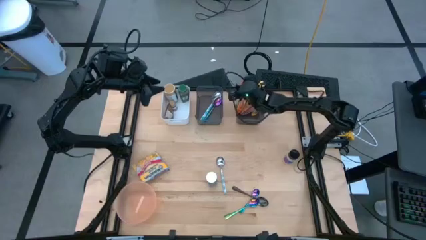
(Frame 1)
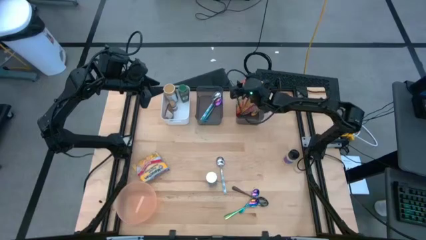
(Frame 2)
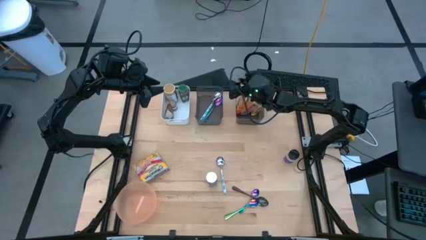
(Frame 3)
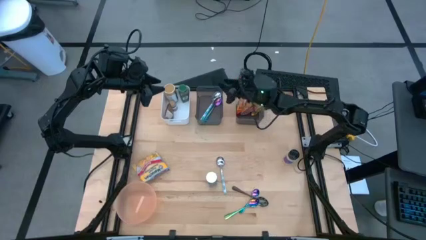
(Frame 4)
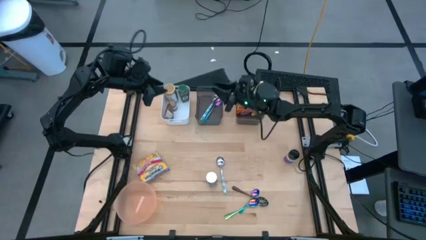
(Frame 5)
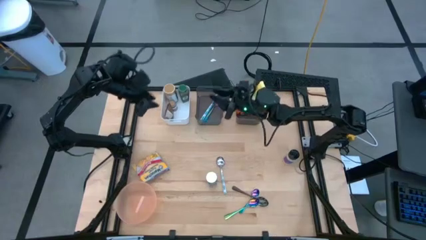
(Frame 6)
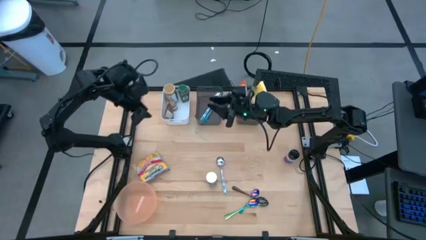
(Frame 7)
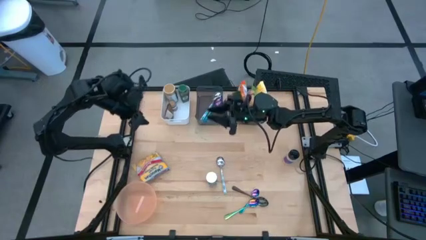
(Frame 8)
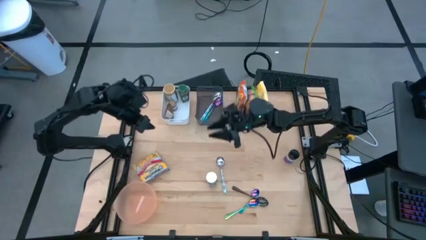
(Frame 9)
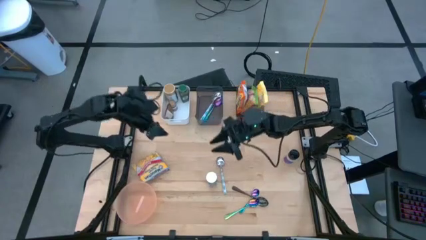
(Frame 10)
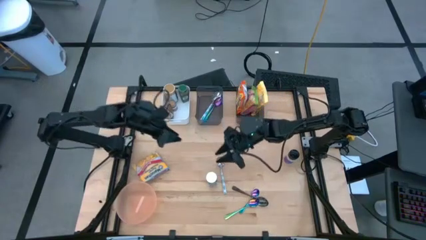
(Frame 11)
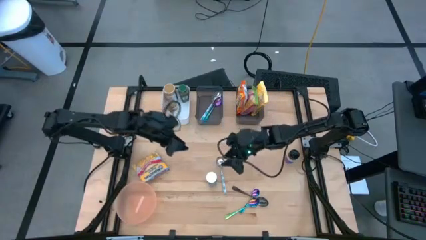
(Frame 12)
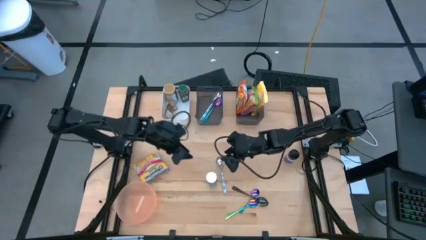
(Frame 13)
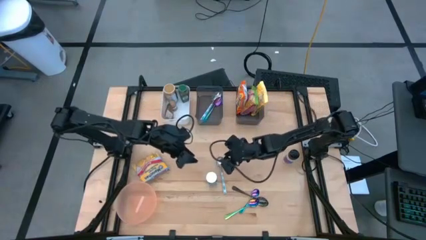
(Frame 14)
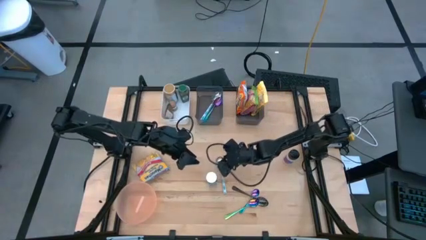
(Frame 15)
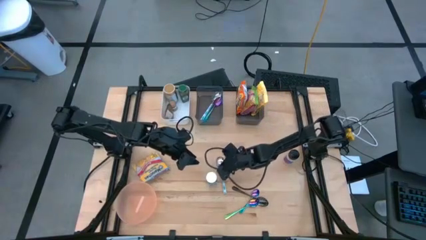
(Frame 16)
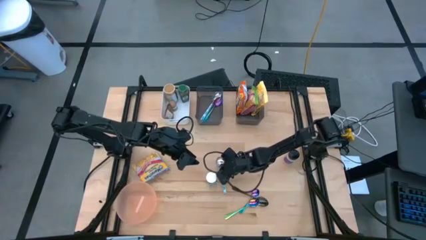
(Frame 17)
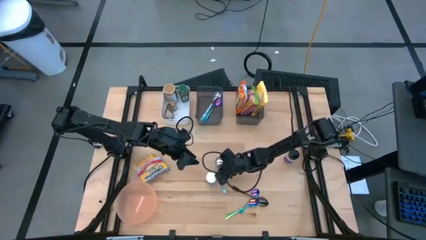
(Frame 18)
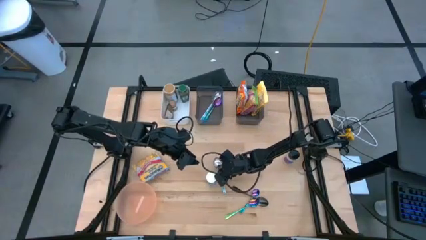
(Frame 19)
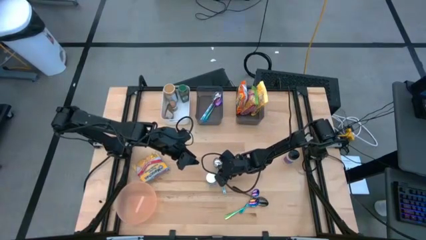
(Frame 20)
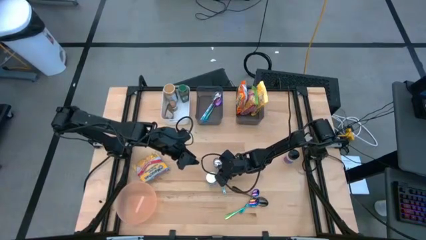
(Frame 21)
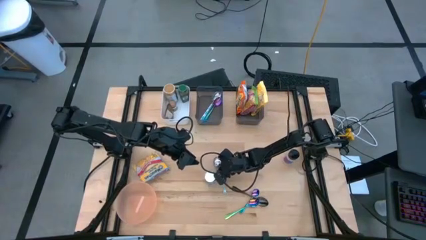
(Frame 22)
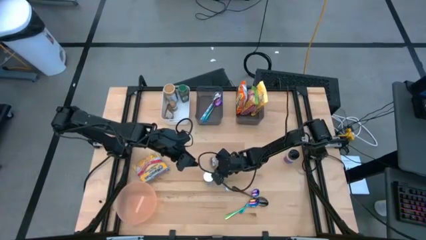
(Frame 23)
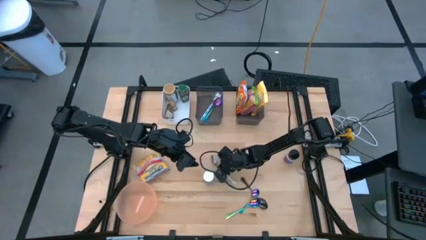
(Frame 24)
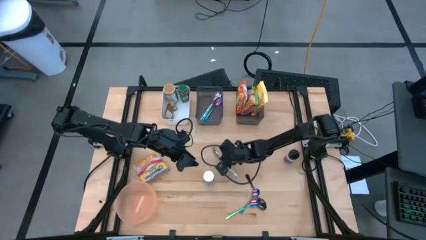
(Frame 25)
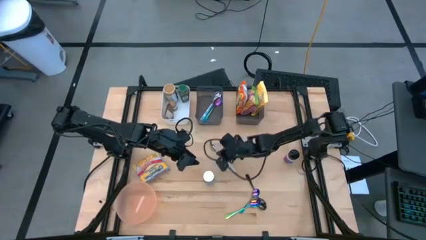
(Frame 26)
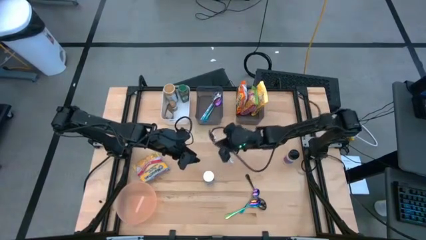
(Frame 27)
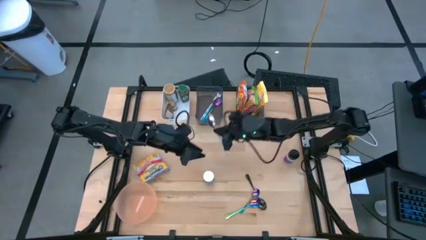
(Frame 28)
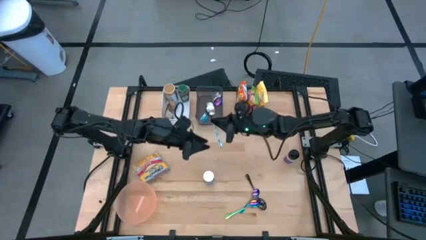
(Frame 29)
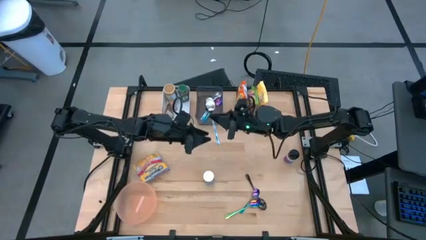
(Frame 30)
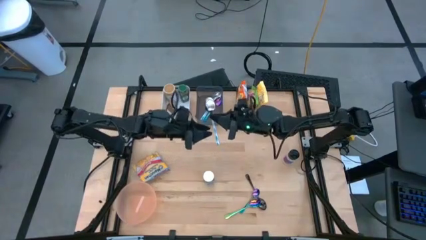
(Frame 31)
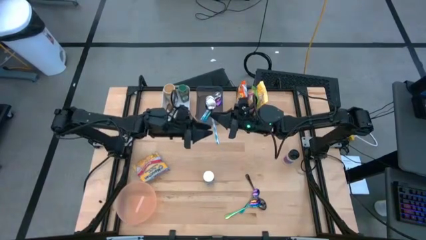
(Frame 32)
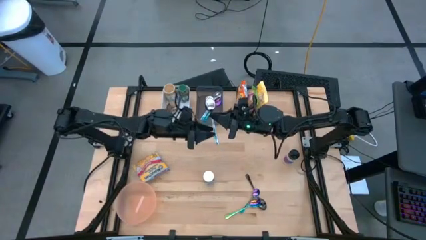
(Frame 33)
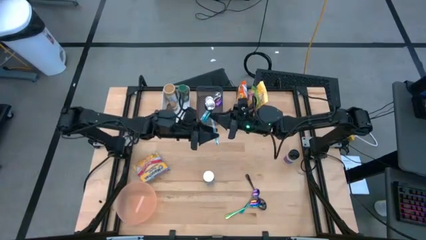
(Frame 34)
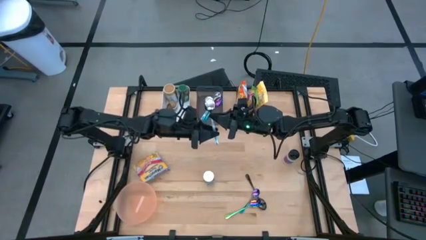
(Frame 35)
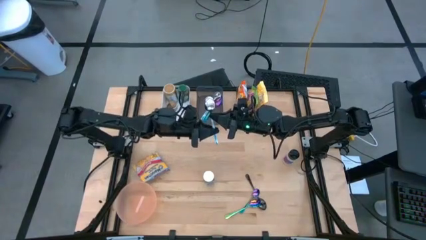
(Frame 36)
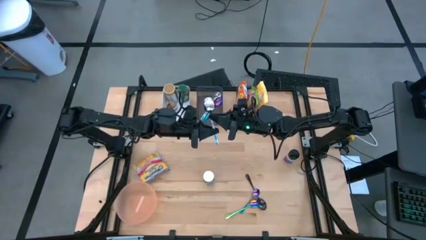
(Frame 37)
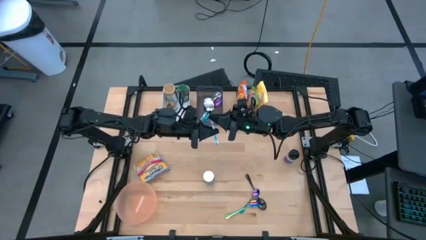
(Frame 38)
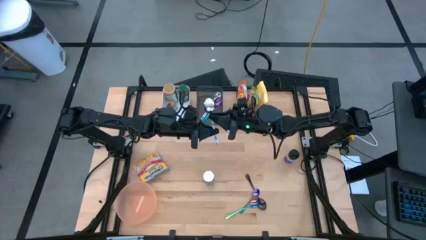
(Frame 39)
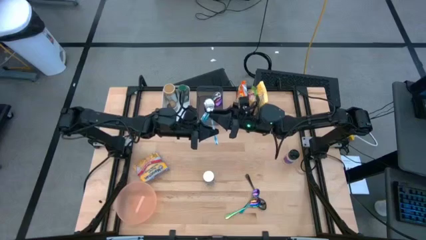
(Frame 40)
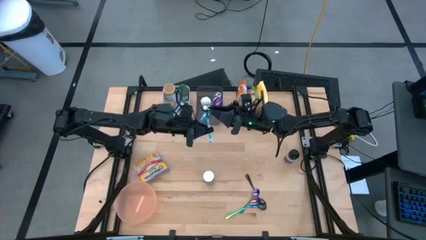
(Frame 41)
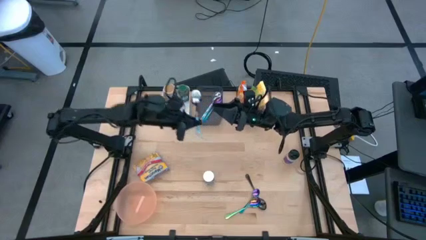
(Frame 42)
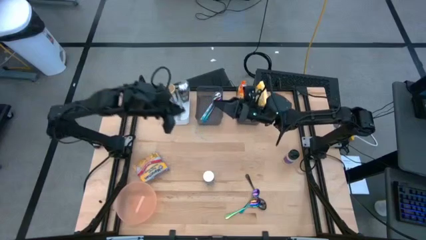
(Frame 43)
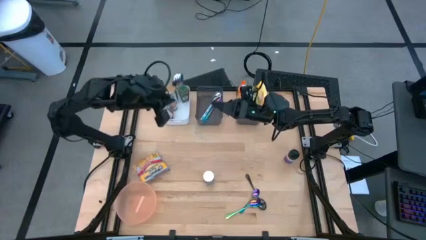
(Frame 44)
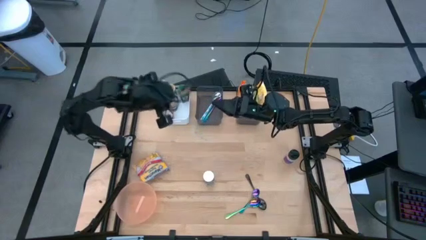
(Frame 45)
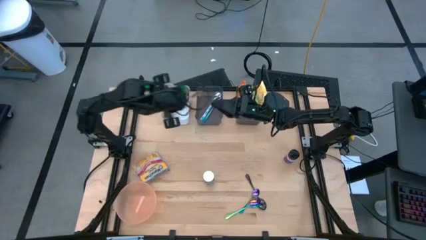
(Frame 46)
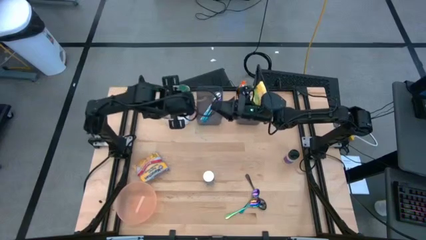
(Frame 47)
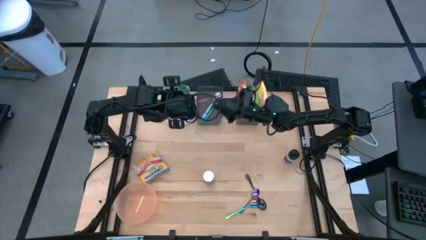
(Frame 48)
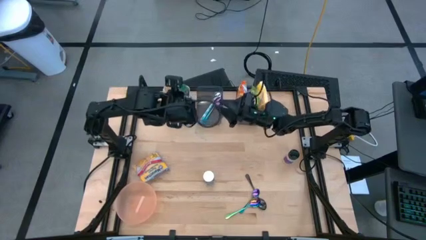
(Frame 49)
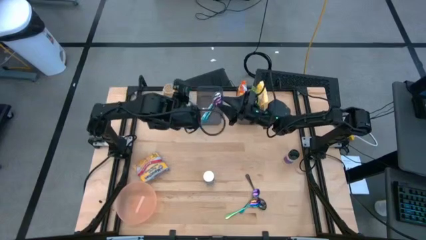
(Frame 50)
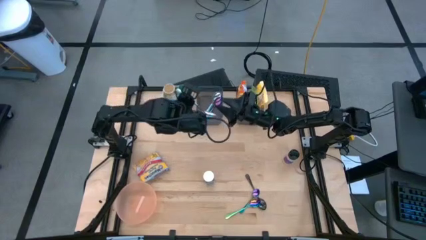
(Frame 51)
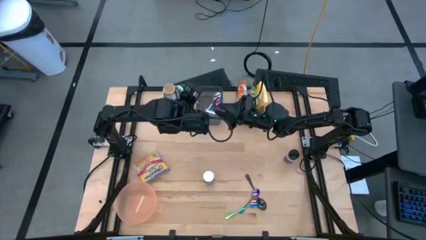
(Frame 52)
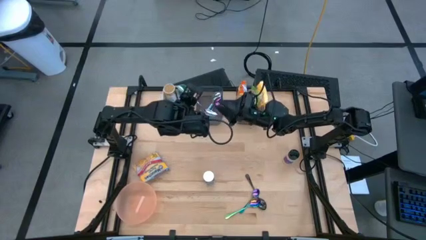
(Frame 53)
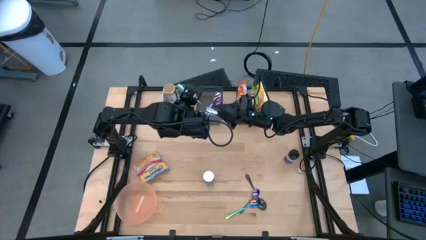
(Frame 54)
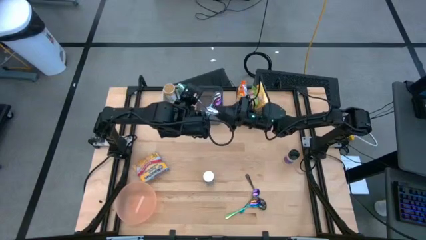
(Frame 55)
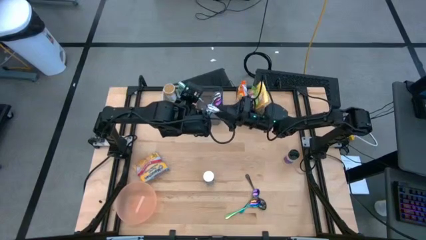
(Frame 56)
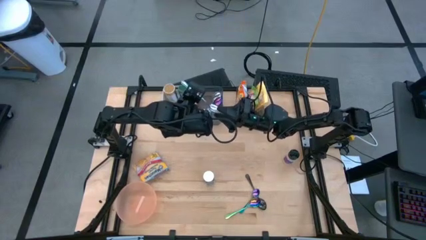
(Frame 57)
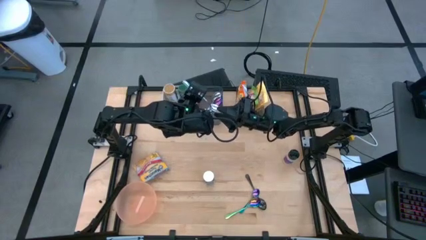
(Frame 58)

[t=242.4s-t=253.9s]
Task: Pick & Place Food Item
Put the patterned spoon into the left black bin

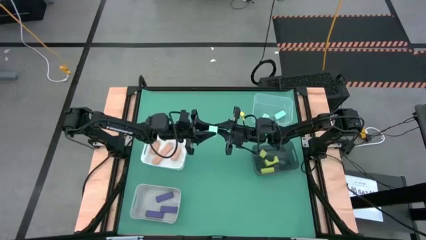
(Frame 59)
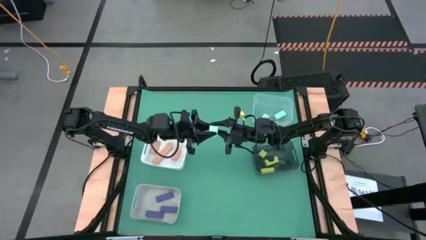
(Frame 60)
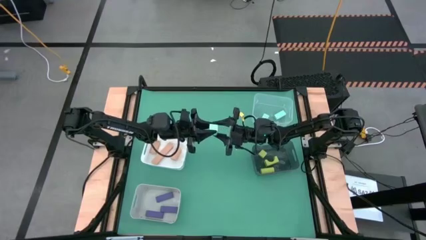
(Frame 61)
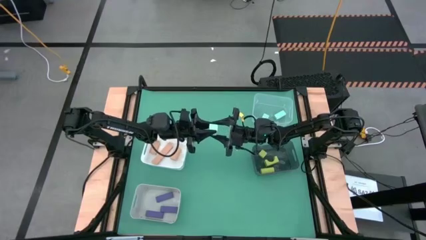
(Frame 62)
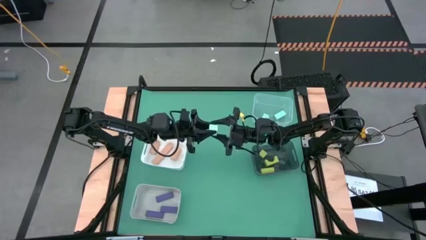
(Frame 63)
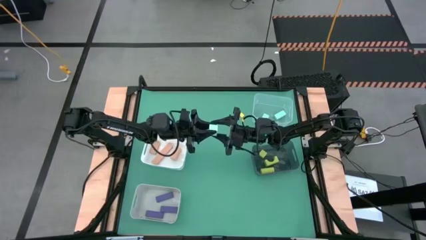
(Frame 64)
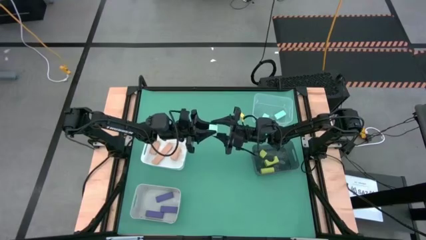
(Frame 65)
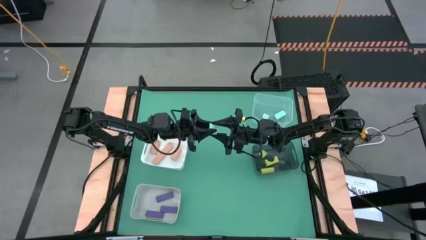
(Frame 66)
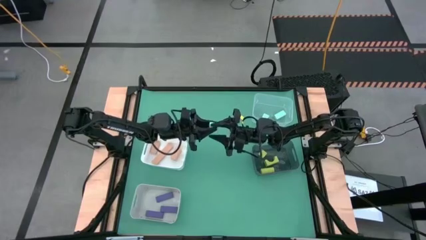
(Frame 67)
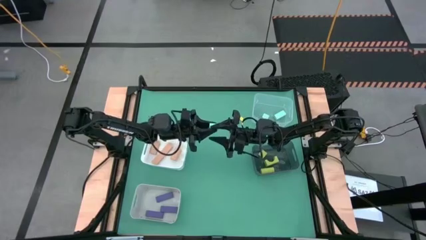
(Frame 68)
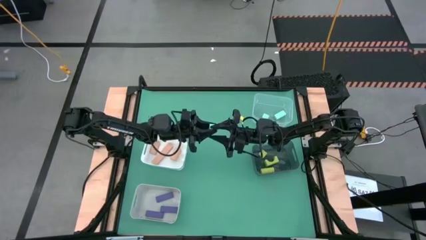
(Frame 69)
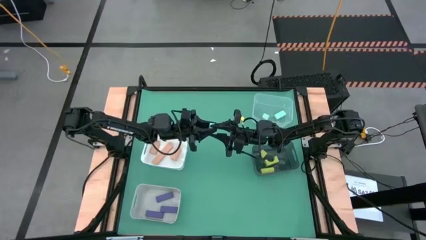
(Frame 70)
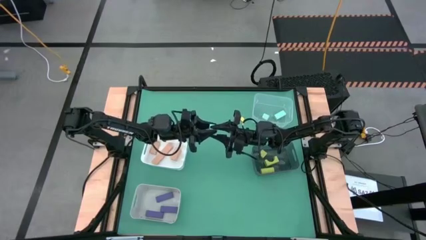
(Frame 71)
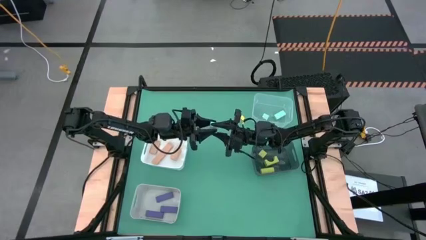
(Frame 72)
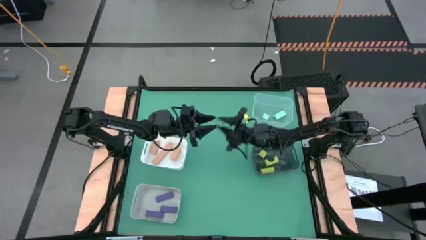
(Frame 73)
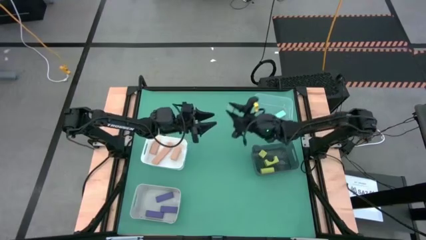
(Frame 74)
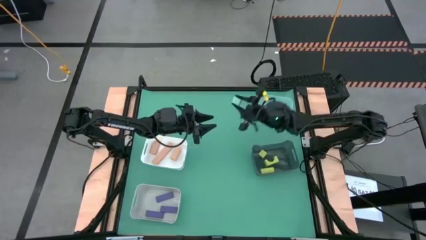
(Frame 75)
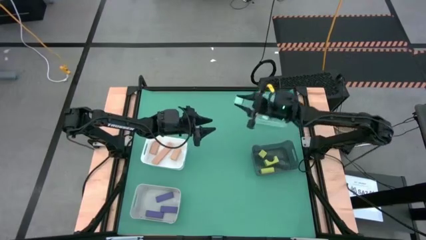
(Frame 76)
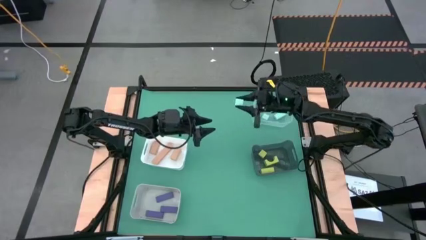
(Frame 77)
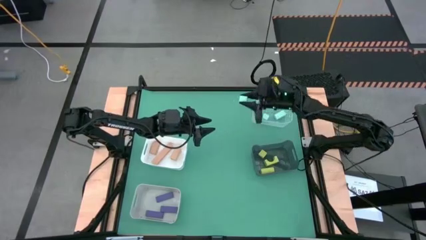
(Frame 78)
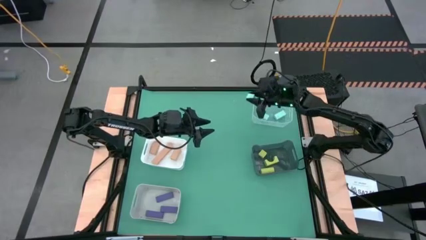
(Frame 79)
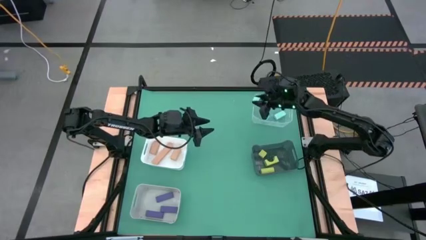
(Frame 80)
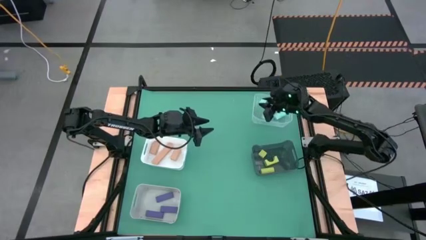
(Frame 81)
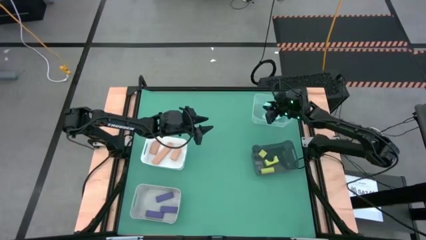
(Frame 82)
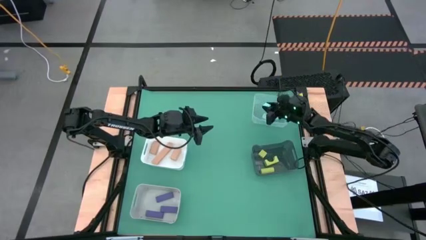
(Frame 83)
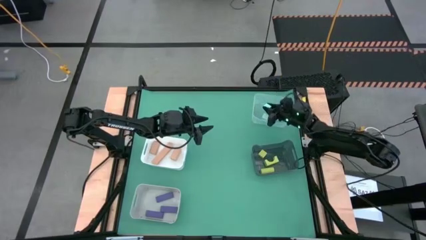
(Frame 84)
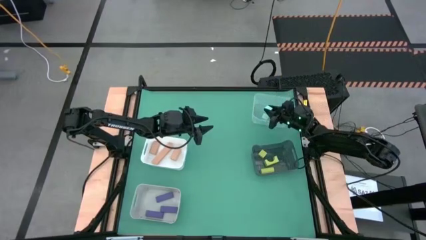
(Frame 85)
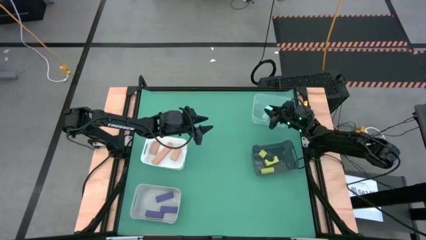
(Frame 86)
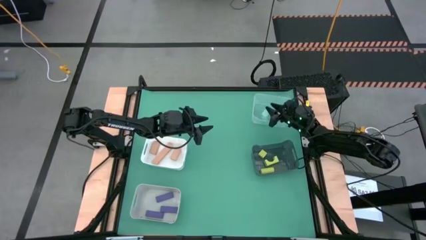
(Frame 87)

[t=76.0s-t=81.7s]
Task: Sort & place blocks by color
Put the blue block into the transparent bin
